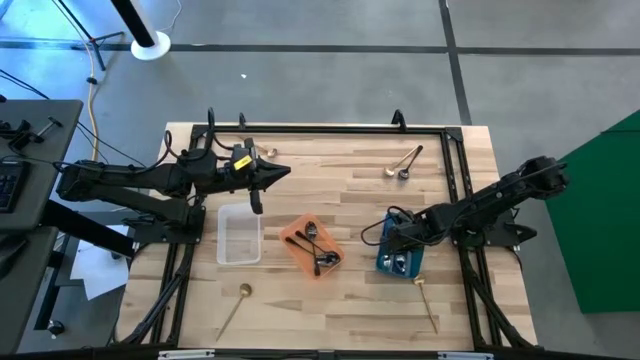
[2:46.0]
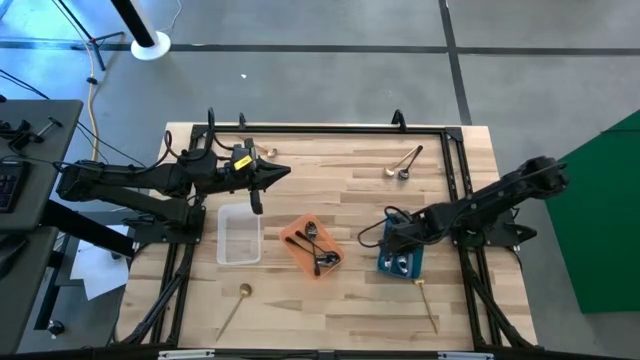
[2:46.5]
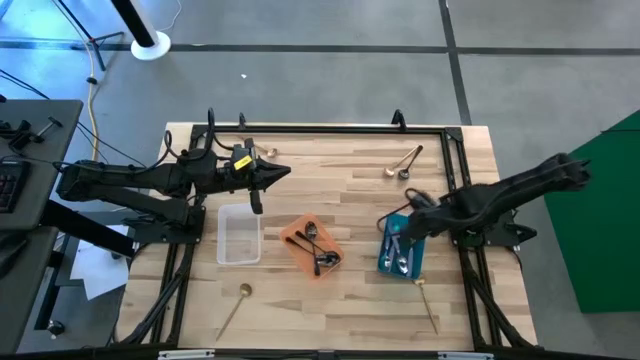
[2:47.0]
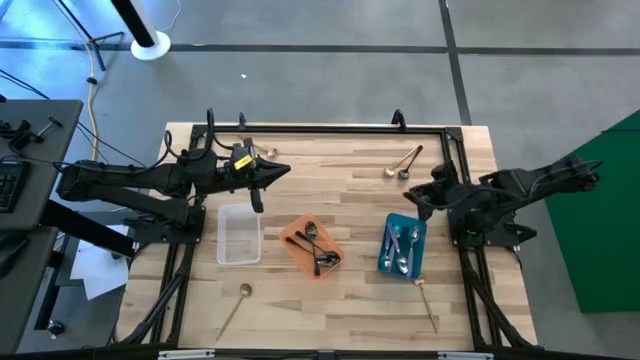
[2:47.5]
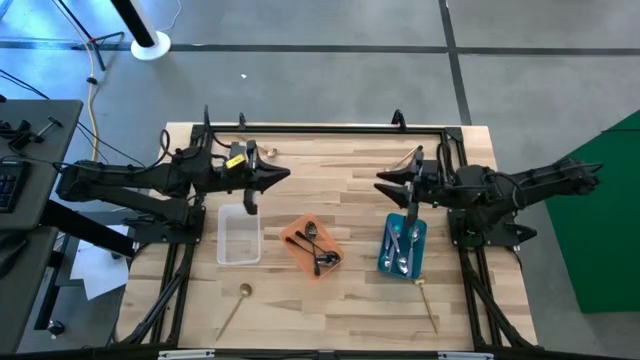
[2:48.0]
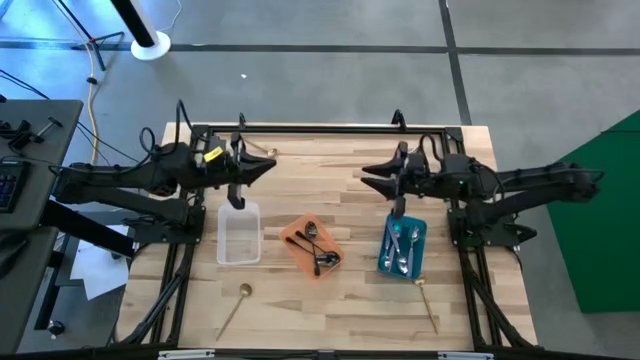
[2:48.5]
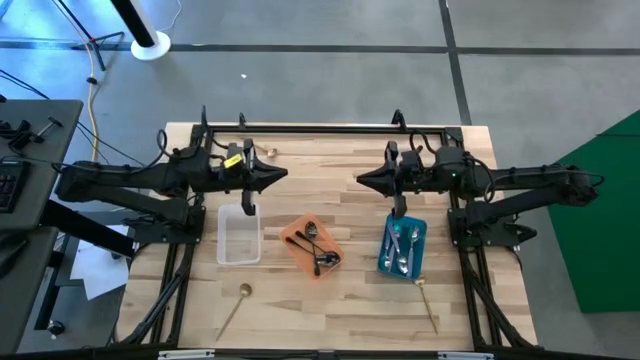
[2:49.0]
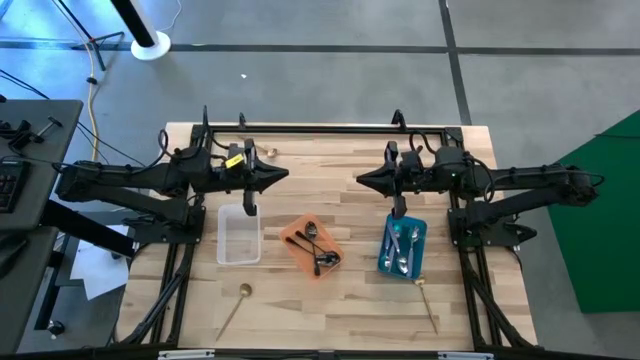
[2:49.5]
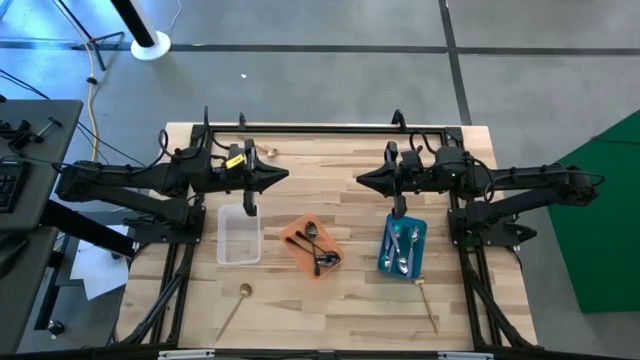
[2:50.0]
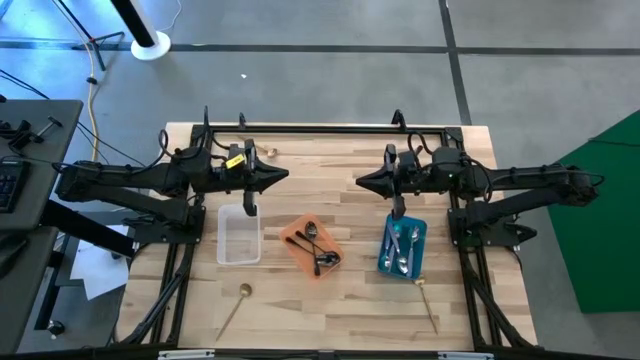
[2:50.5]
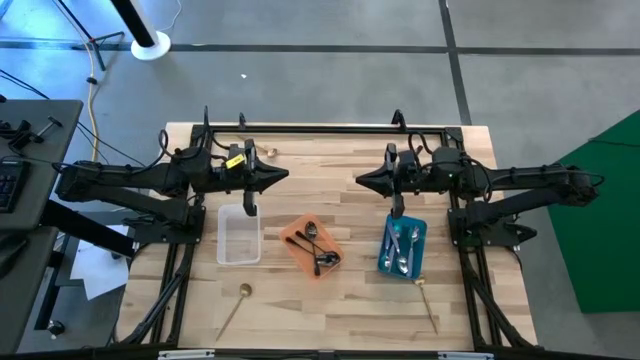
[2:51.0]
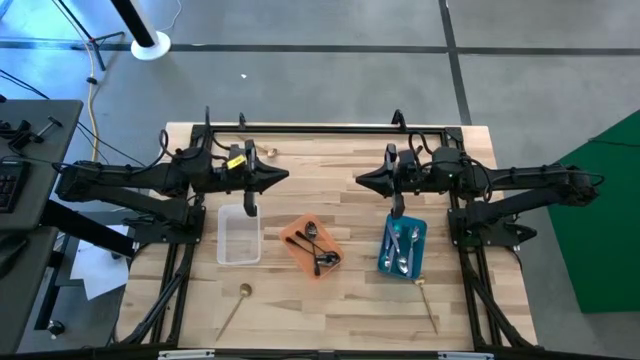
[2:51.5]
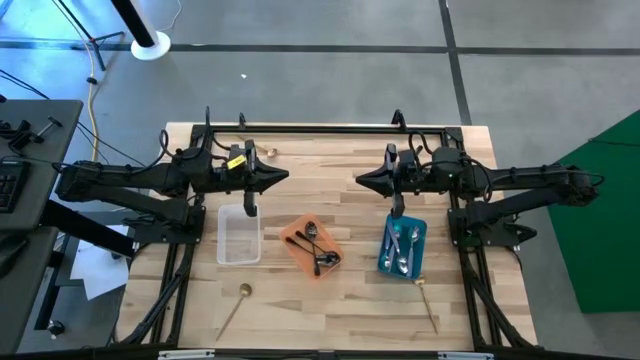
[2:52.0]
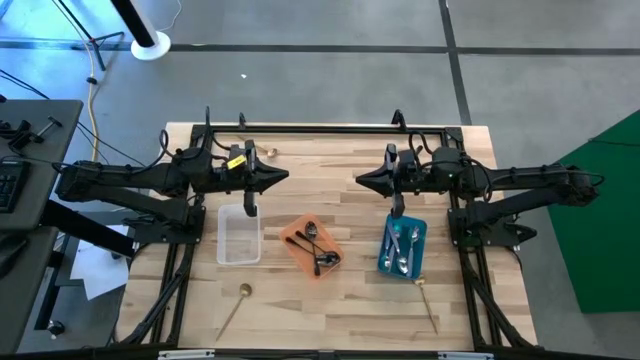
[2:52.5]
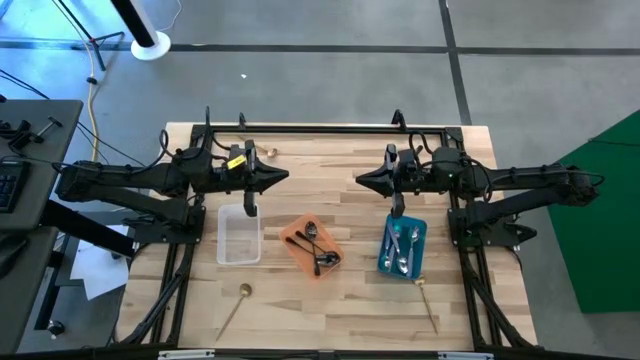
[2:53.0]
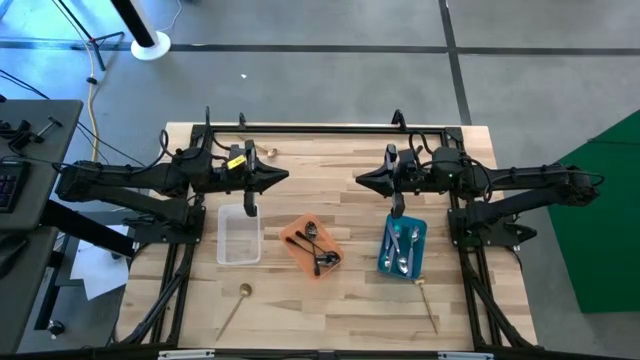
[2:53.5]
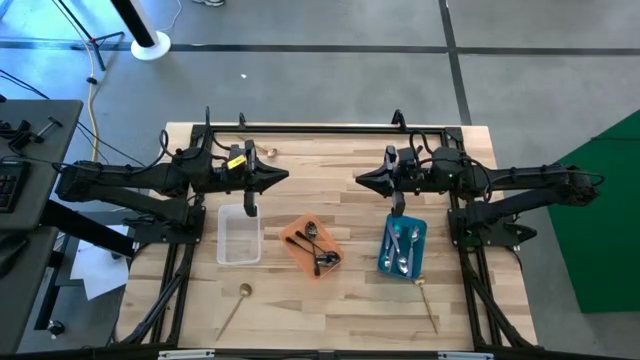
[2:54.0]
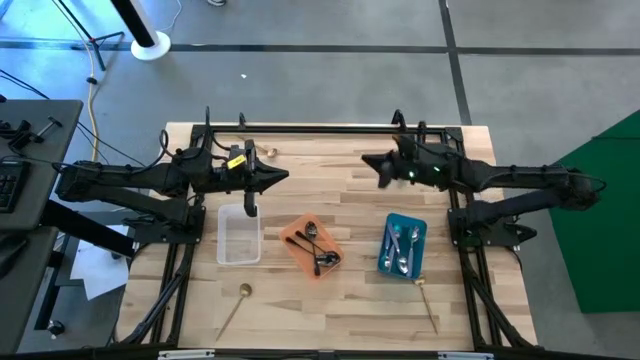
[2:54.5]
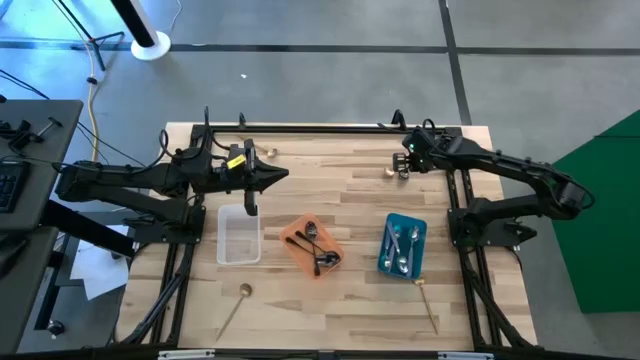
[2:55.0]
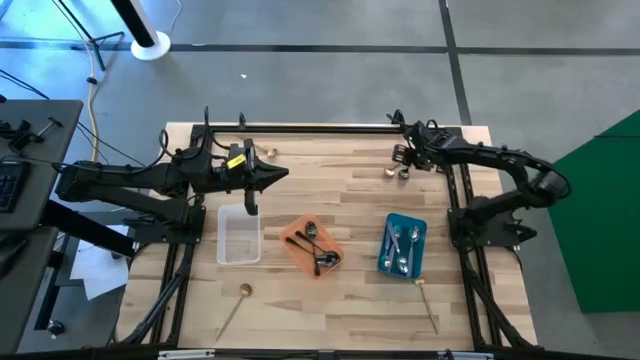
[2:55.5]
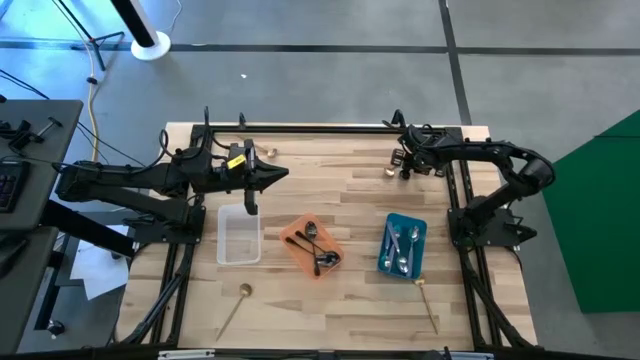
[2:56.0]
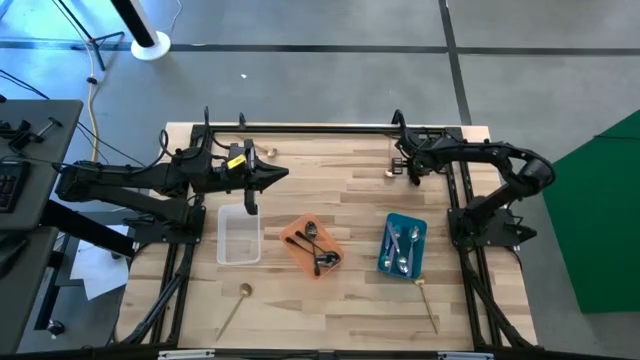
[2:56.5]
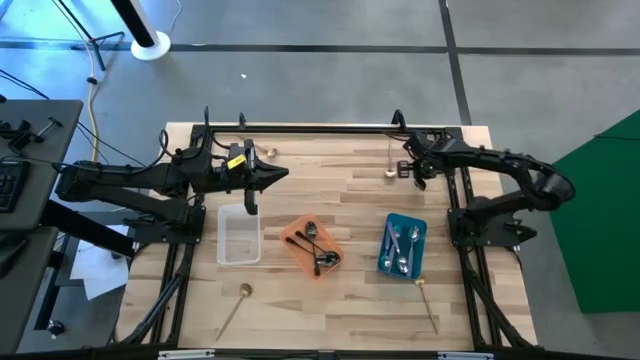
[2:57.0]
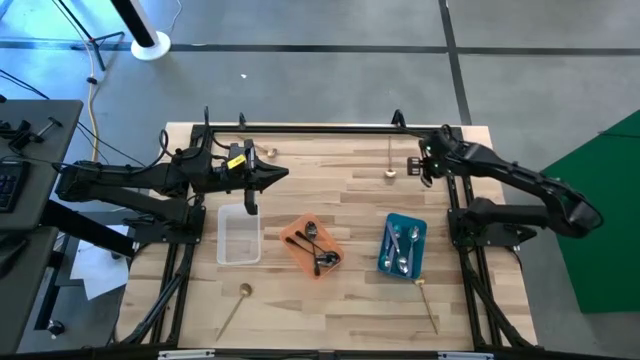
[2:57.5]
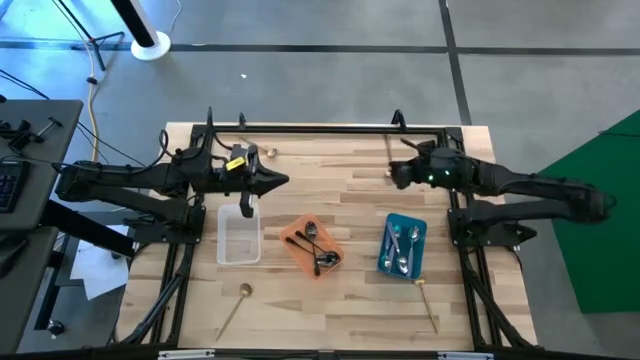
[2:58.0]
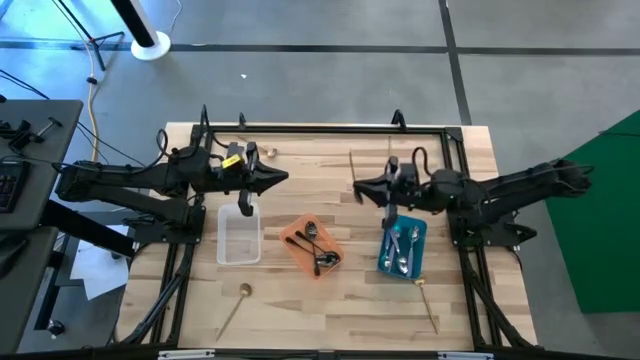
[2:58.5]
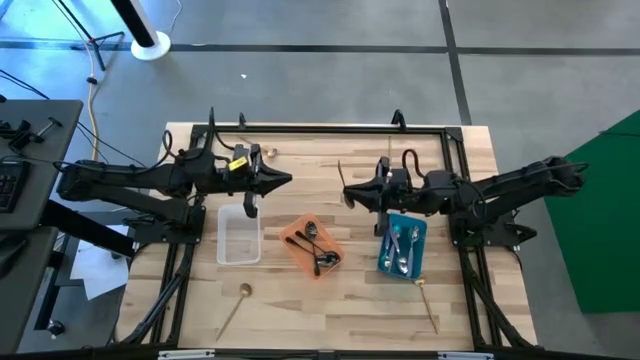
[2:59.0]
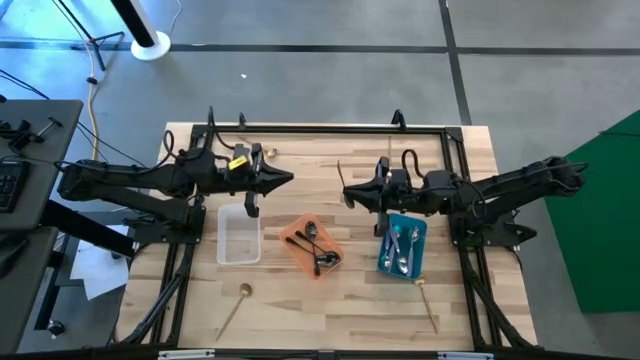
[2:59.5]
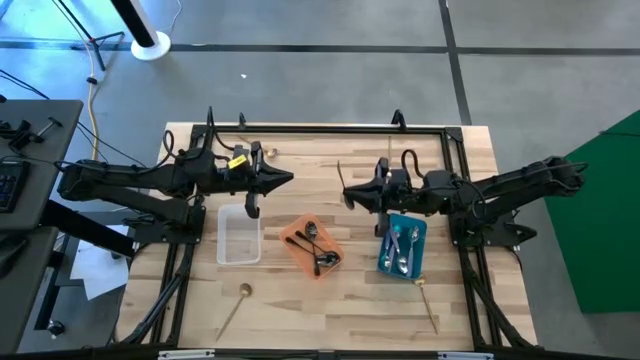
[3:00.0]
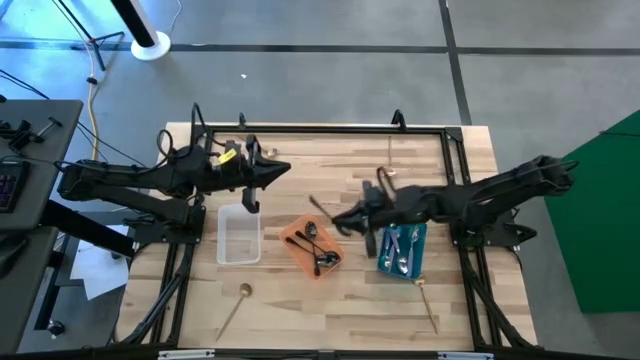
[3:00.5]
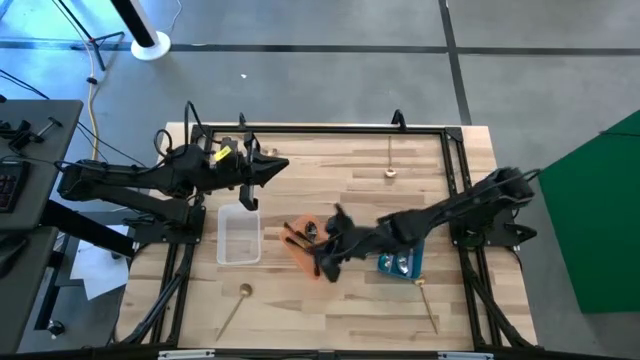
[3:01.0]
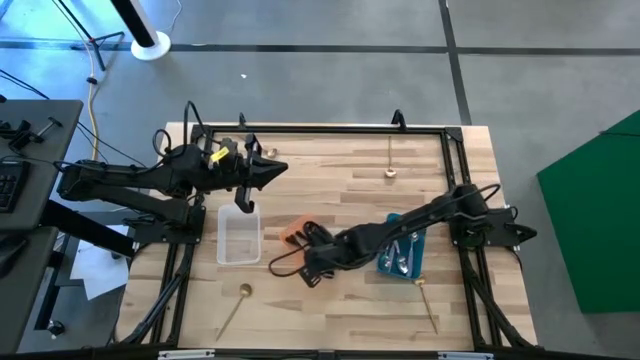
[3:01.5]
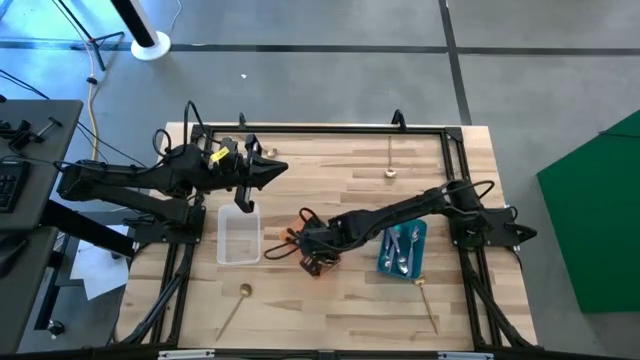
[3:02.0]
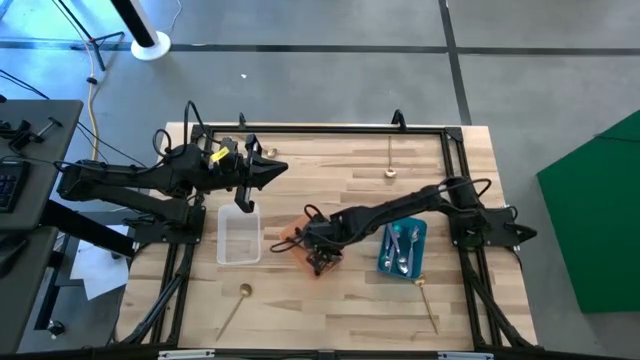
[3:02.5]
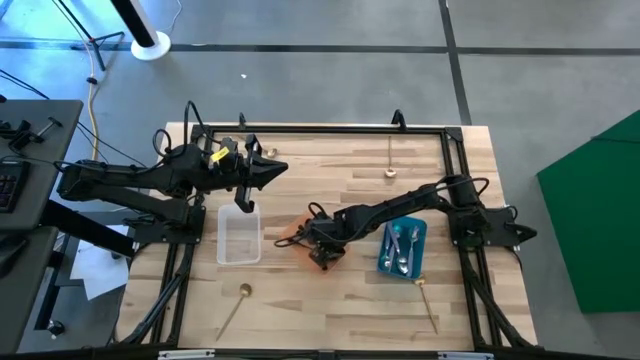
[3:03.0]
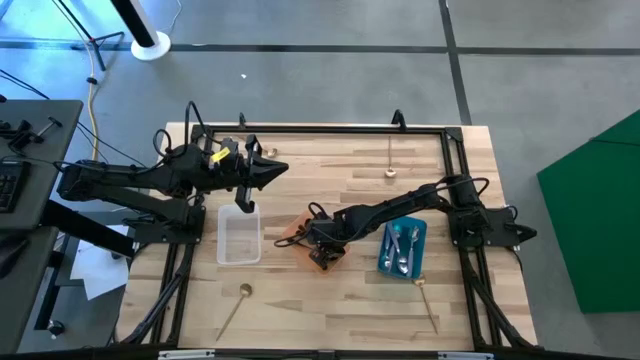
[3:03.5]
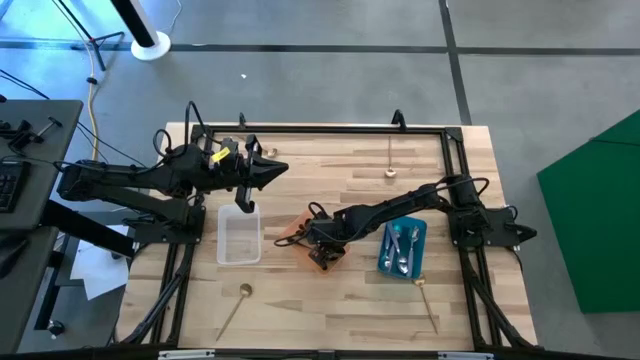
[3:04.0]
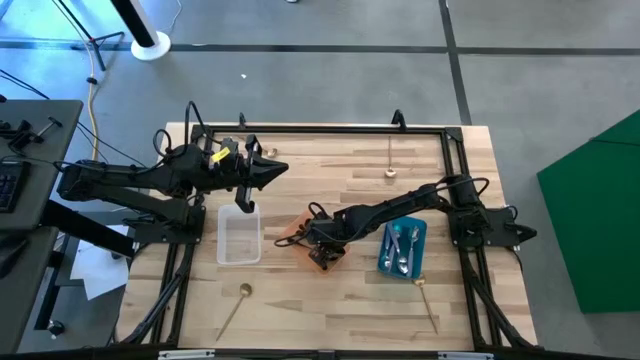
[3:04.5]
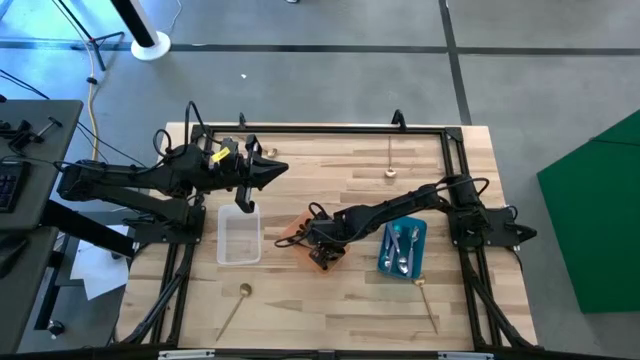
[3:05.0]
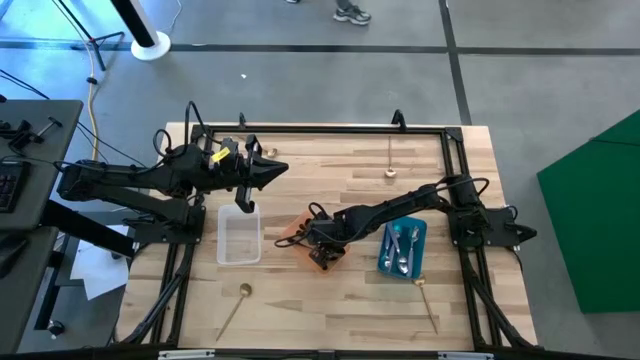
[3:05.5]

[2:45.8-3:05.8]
Task: Sort silverware by color (type)
Put the black spoon into the orange bin
